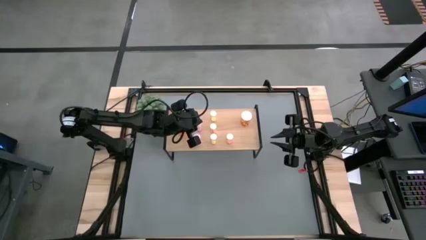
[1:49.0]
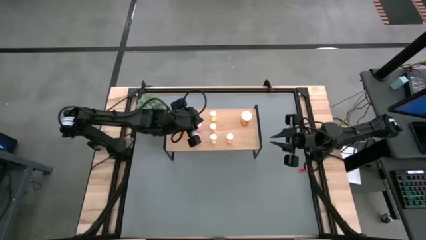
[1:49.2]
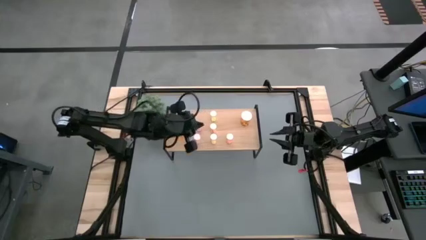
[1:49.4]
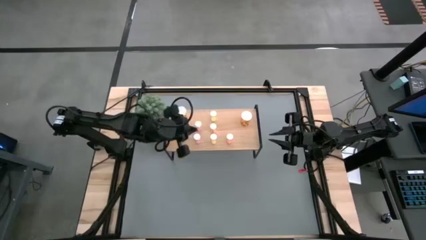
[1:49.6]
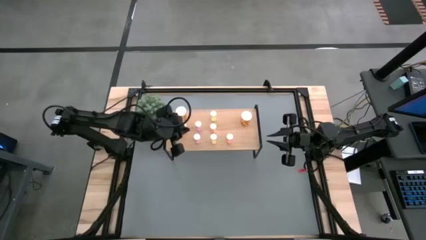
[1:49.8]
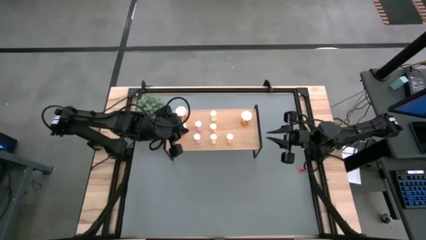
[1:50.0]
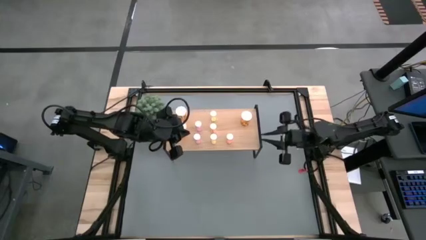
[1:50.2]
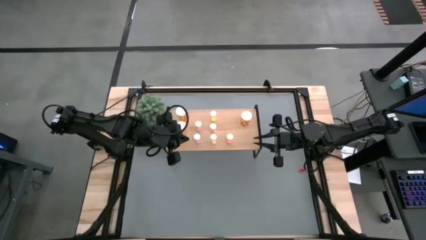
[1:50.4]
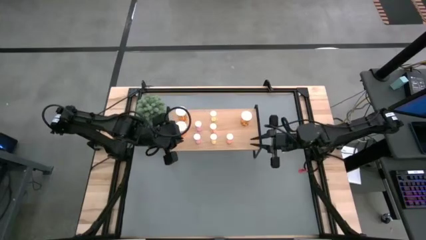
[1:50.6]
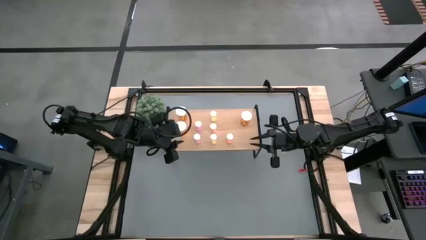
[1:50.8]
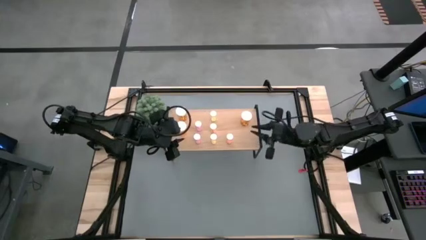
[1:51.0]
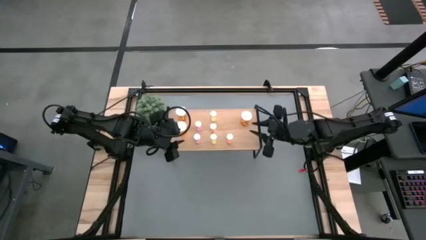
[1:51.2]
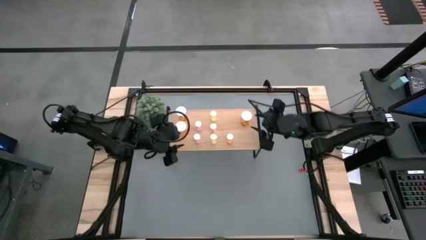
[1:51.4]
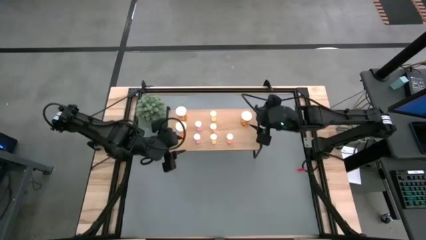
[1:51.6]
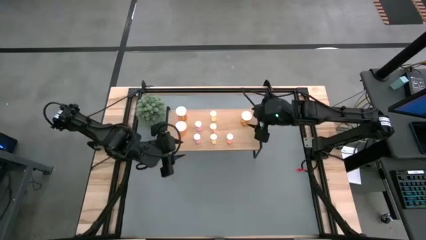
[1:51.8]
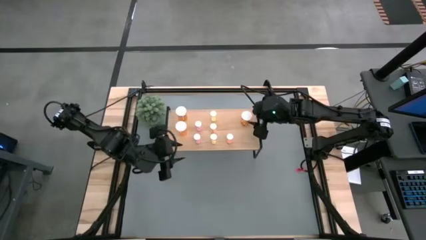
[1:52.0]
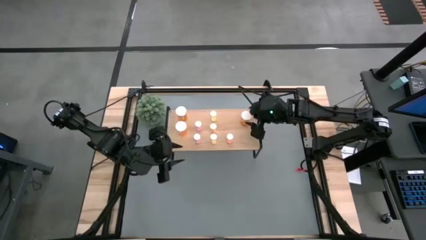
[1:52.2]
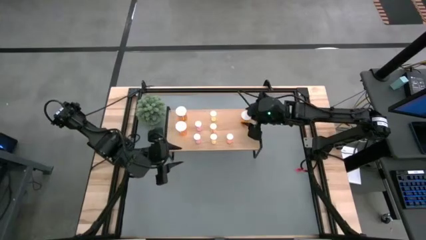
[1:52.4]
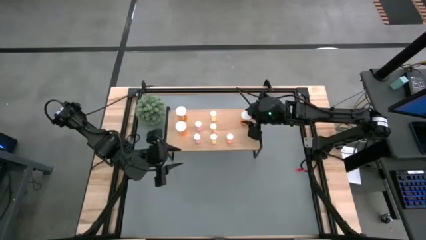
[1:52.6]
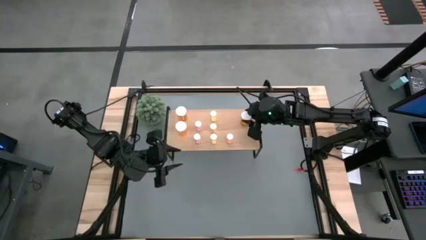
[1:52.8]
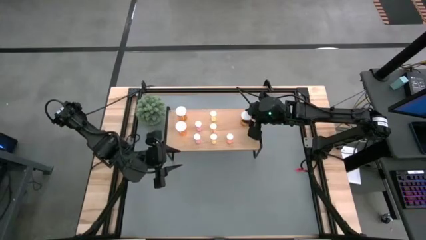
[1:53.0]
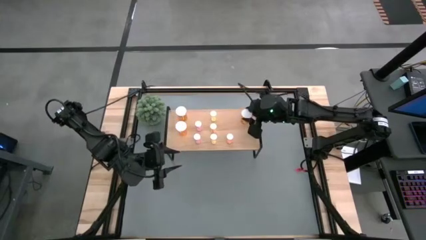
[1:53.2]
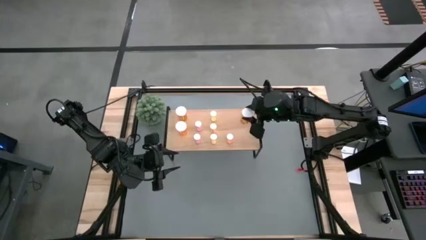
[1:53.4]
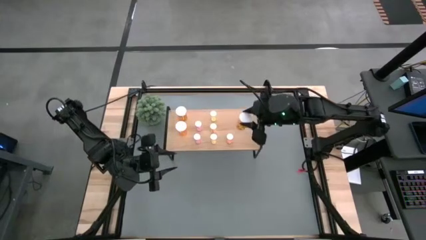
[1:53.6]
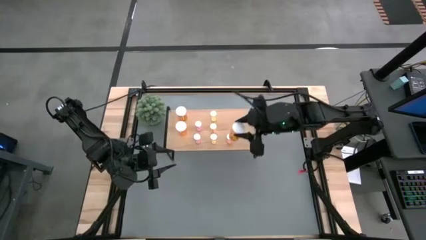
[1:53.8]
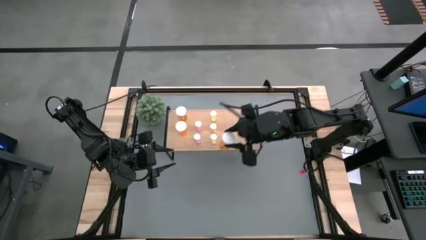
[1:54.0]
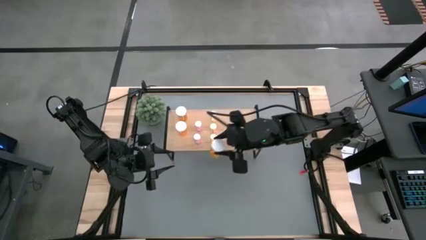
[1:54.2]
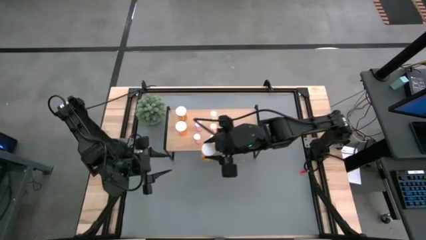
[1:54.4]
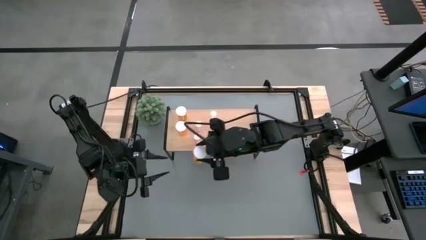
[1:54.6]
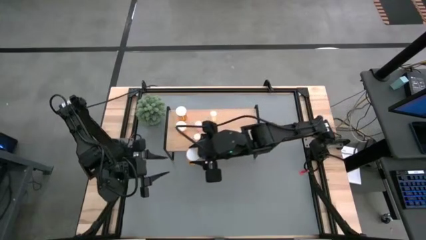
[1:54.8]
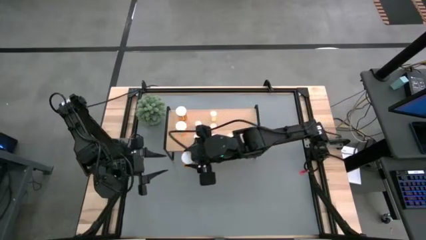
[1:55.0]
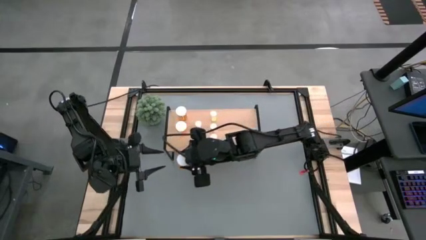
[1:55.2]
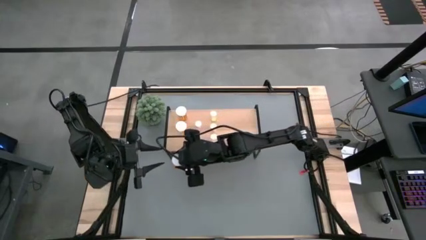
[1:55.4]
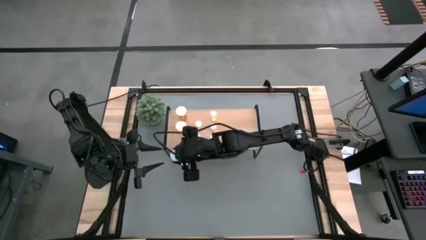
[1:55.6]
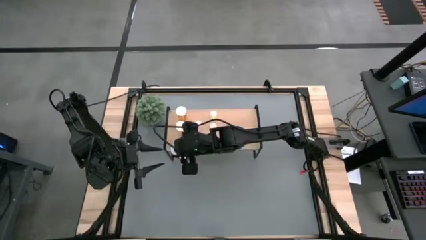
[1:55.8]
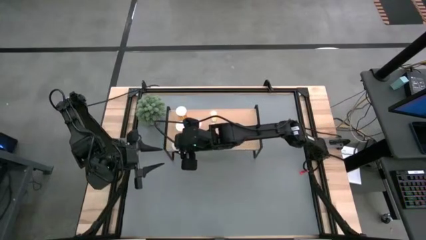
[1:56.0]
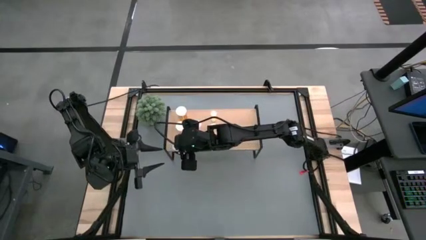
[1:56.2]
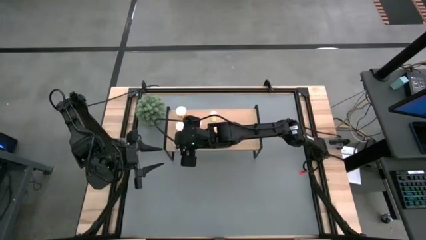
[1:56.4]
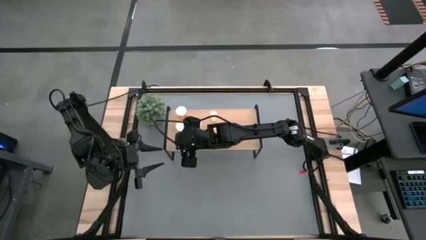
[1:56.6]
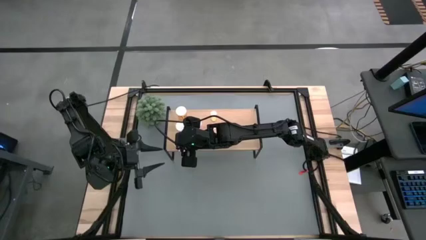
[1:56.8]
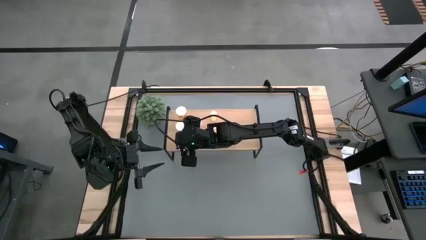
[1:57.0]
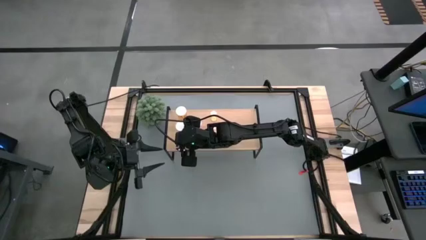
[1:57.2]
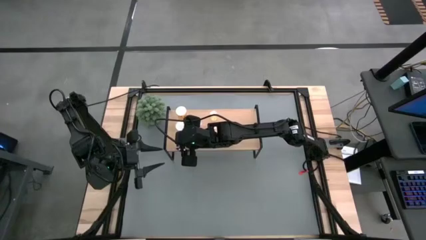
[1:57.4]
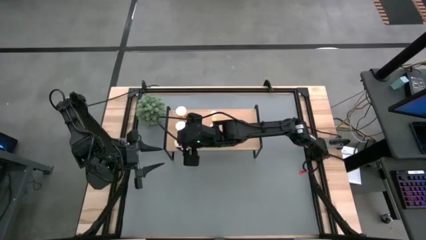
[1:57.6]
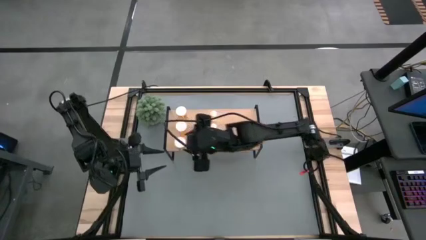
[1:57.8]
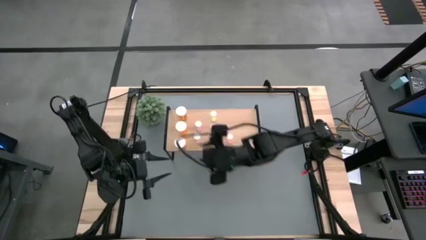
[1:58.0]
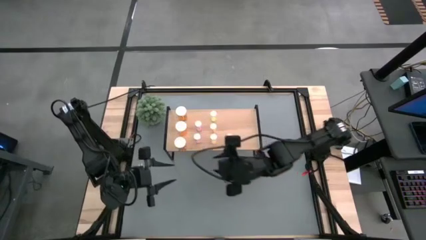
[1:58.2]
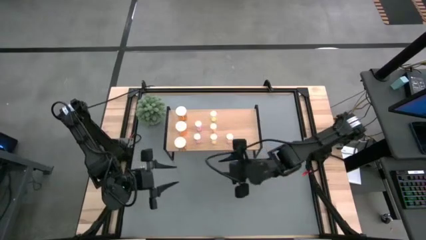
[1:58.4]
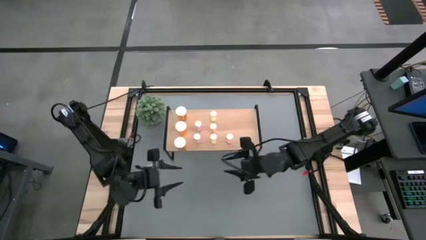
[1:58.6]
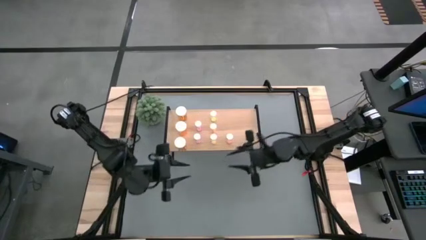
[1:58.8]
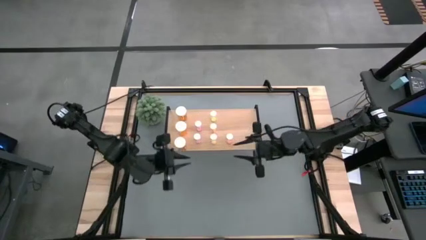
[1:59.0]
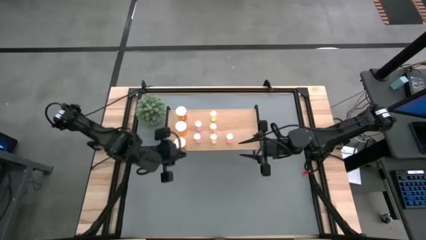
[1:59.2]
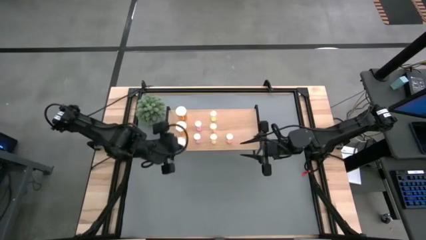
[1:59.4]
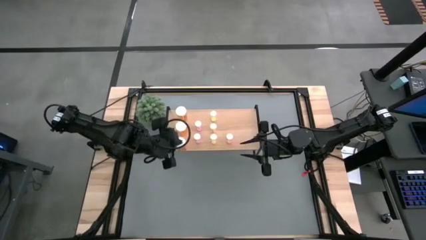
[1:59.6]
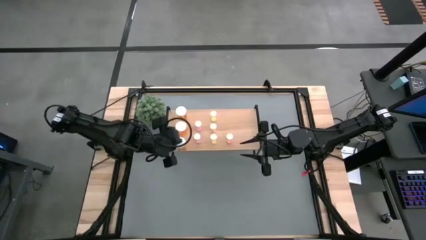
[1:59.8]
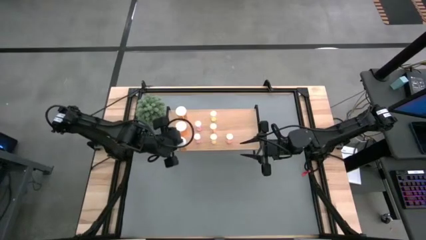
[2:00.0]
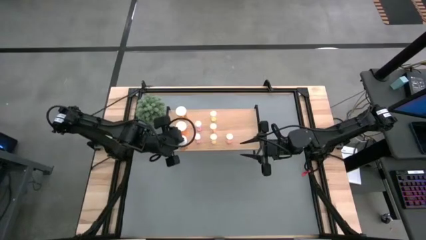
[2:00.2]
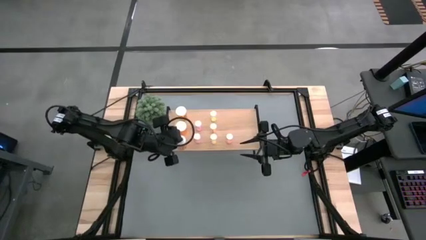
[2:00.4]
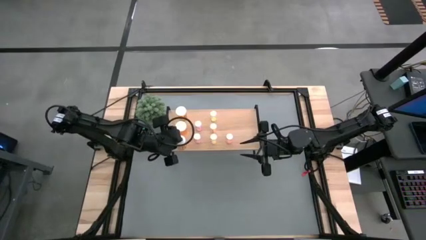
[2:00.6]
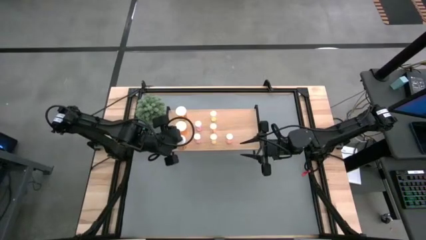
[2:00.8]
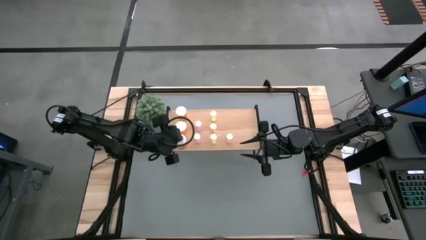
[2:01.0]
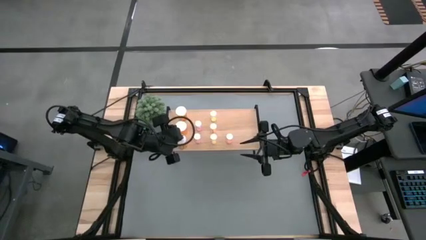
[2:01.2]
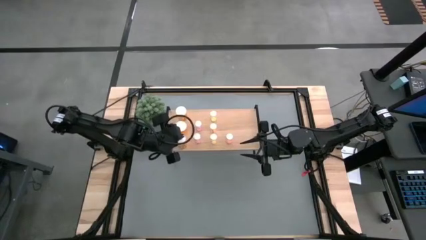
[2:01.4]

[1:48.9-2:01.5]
Task: Pick and place medicine bottles onto shelf by color
Move the orange pill bottle to align with the other orange pill bottles on the shelf

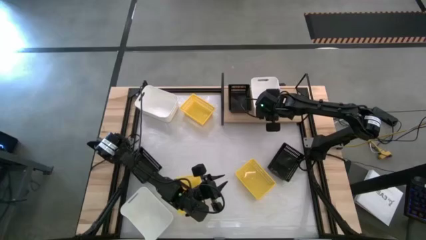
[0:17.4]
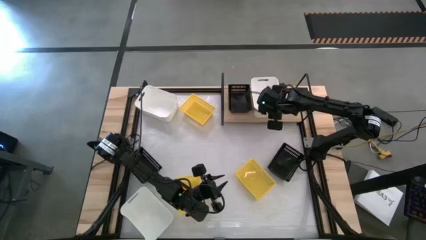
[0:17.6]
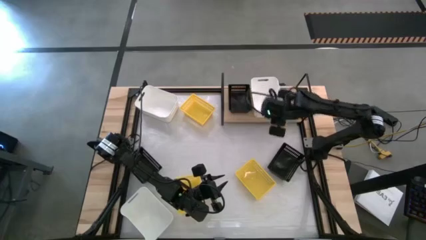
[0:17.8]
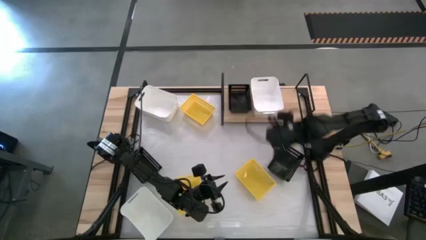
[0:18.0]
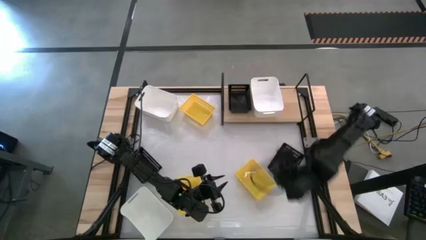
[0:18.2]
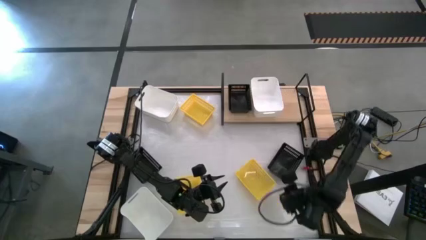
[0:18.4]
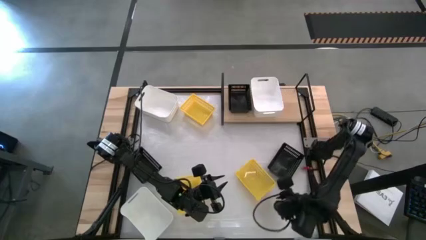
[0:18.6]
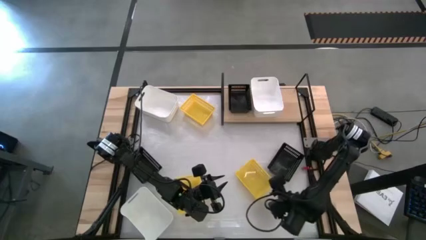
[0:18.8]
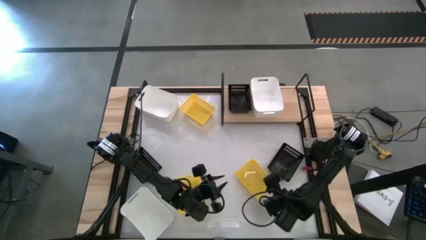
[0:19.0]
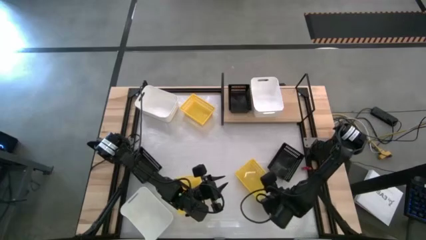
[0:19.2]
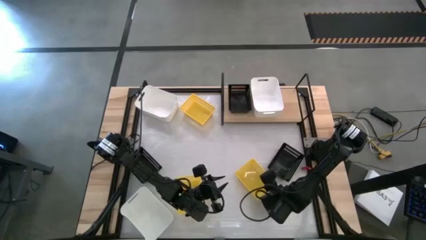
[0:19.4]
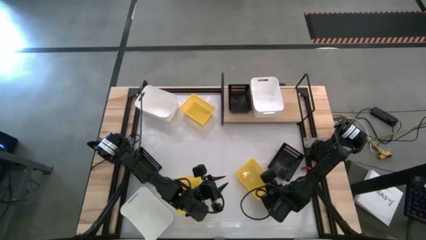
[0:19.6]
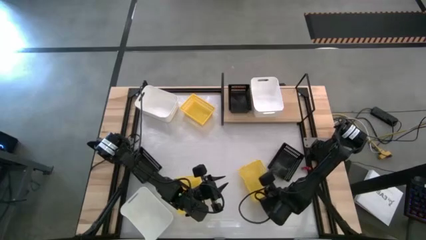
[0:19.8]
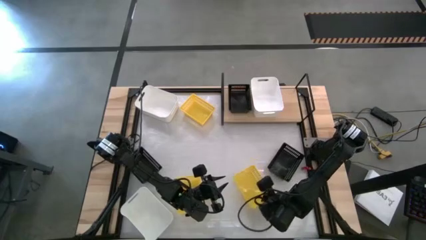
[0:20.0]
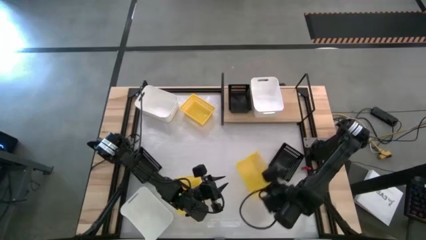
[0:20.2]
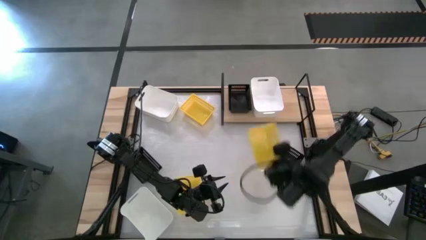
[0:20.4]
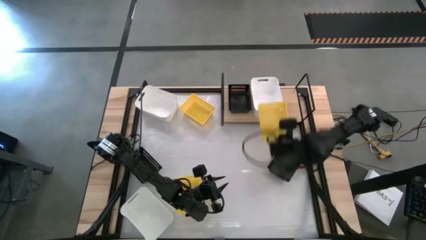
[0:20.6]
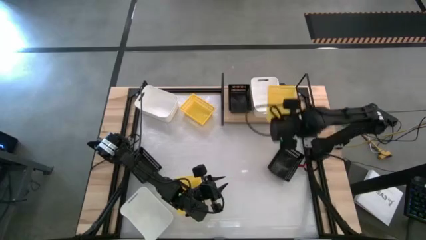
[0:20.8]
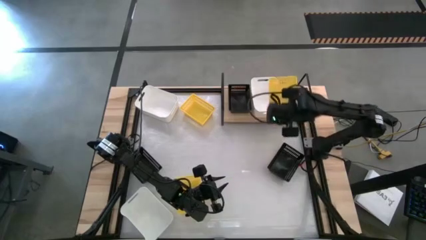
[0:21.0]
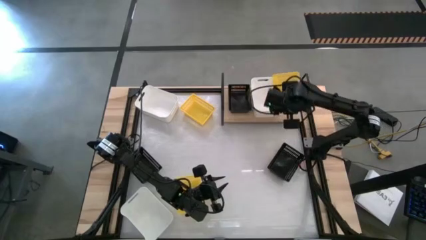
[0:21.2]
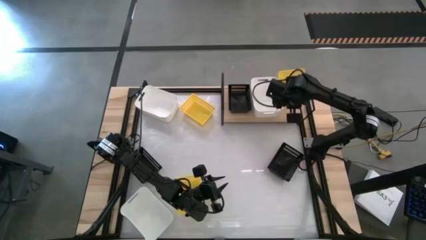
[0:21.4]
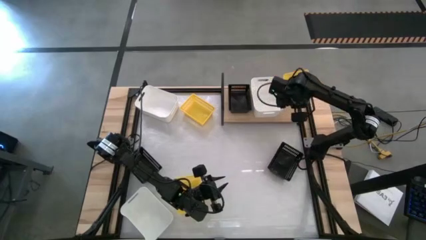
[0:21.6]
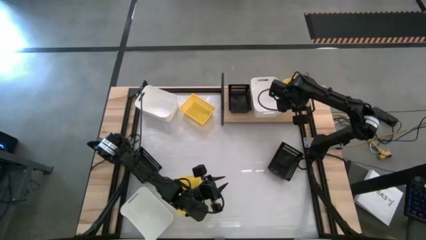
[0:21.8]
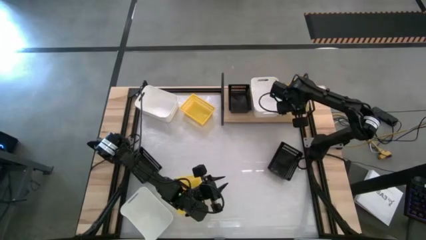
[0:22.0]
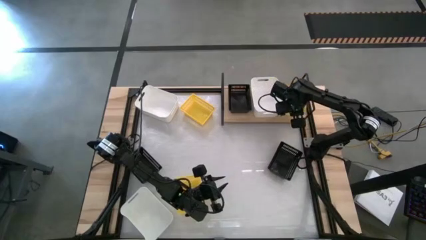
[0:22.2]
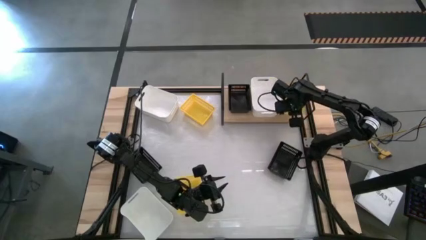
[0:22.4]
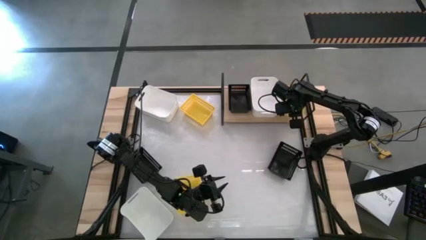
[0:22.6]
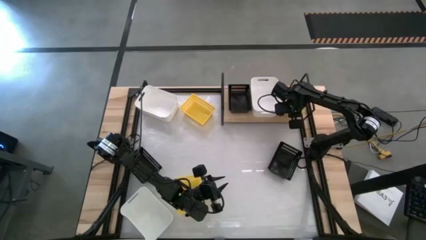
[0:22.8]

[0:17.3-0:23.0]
Task: Stack baskets on shelf by color
Put the bottom right yellow bin on the shelf
